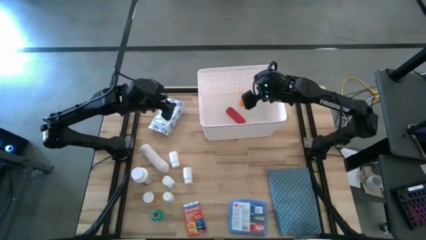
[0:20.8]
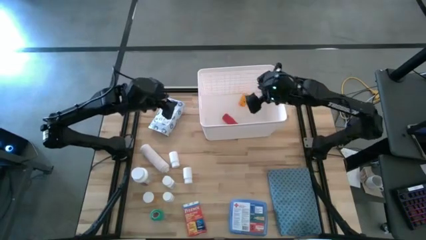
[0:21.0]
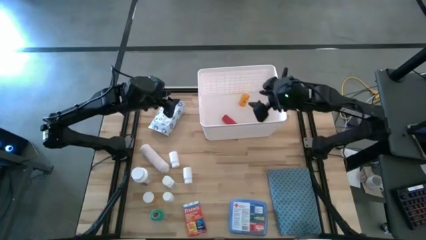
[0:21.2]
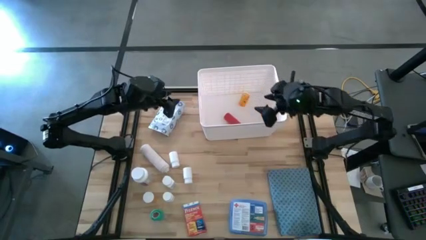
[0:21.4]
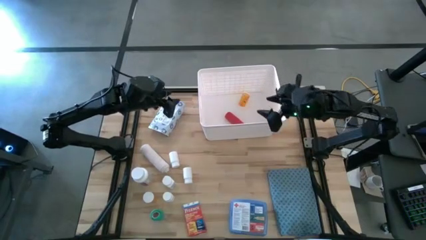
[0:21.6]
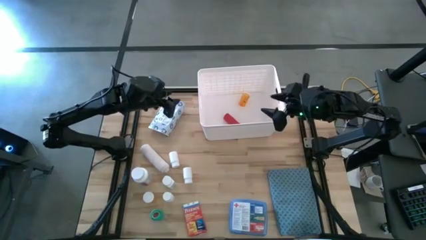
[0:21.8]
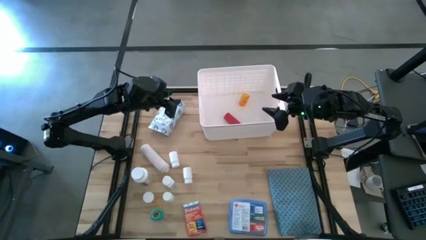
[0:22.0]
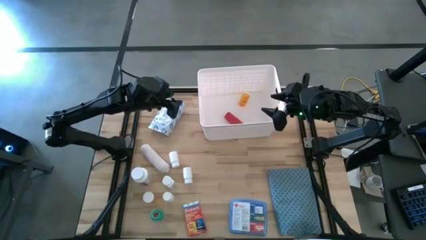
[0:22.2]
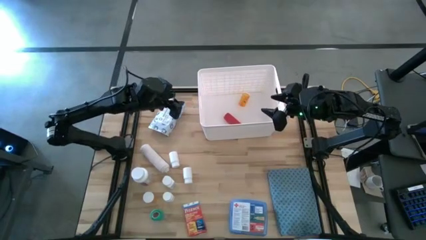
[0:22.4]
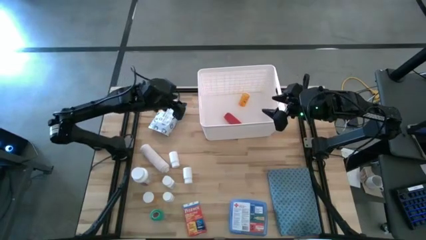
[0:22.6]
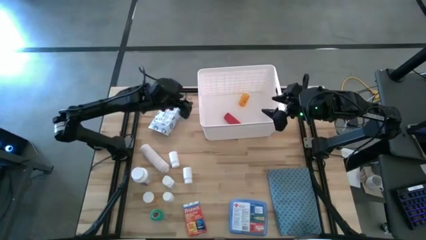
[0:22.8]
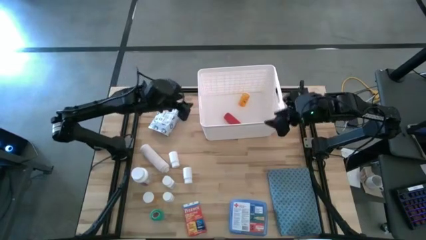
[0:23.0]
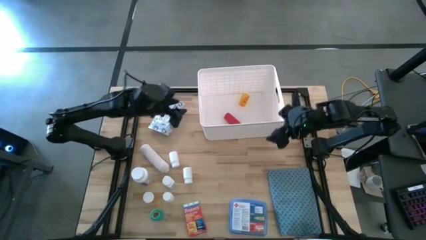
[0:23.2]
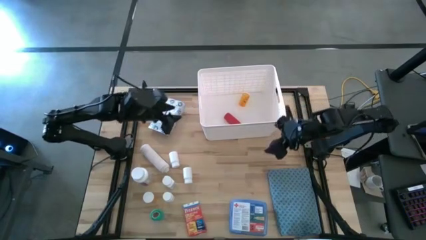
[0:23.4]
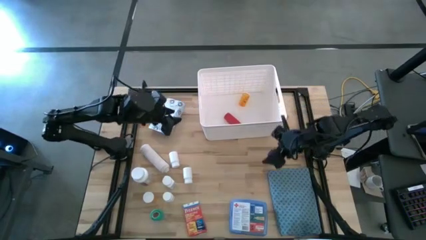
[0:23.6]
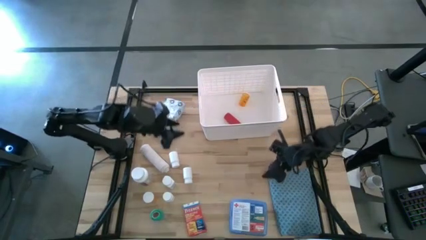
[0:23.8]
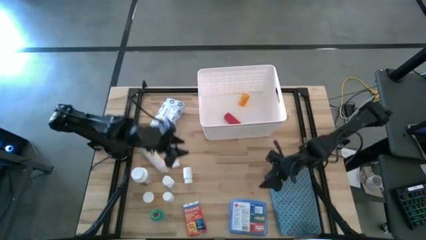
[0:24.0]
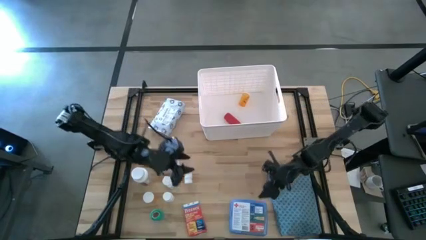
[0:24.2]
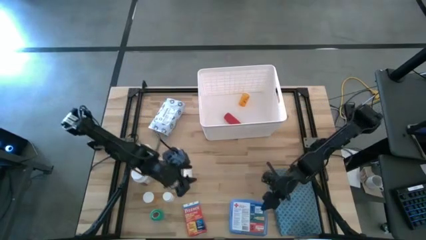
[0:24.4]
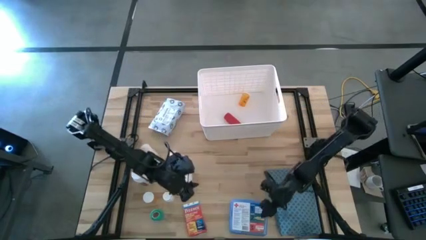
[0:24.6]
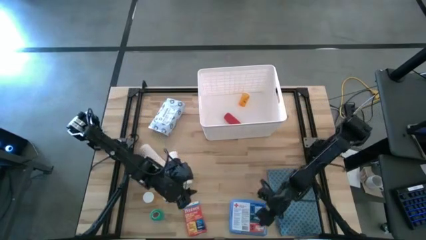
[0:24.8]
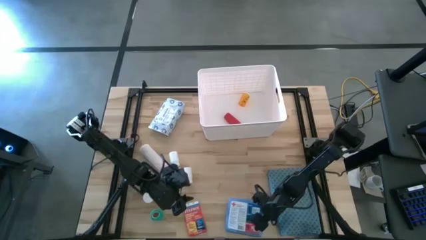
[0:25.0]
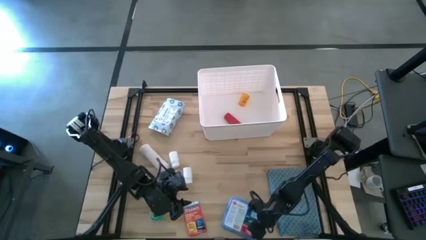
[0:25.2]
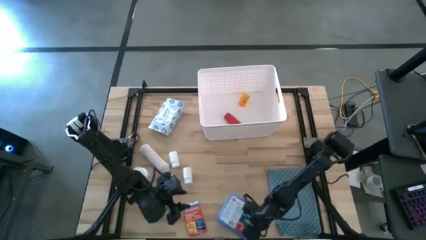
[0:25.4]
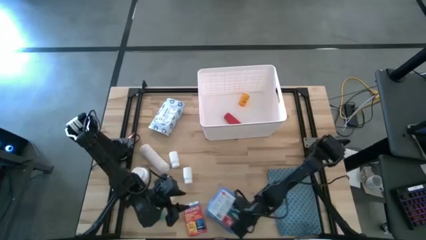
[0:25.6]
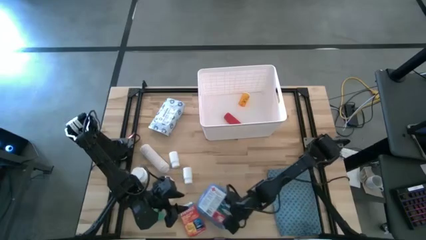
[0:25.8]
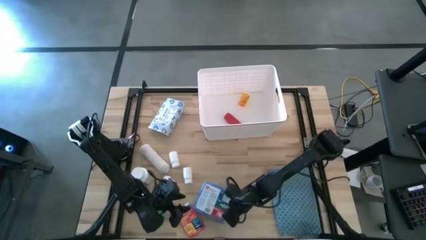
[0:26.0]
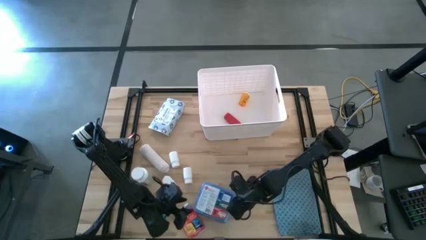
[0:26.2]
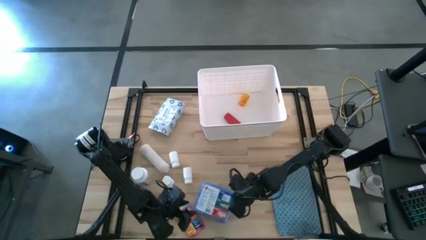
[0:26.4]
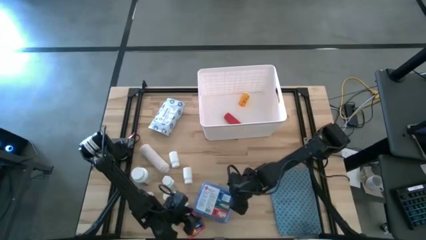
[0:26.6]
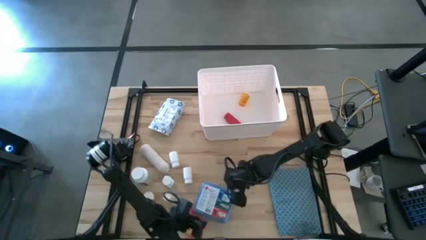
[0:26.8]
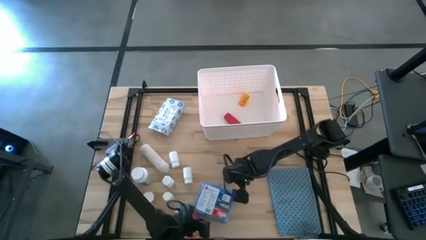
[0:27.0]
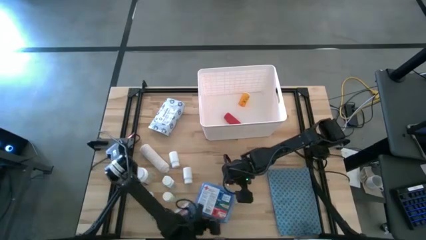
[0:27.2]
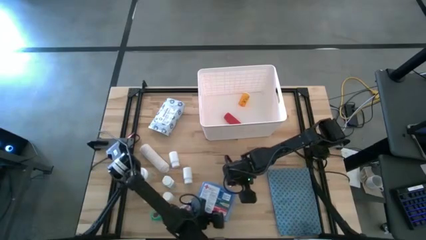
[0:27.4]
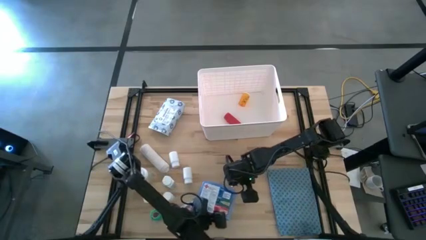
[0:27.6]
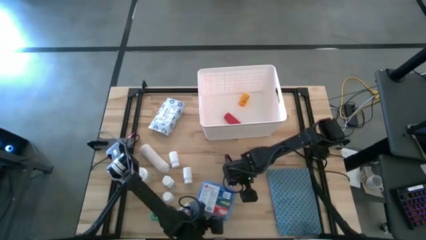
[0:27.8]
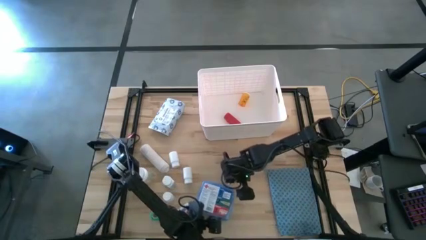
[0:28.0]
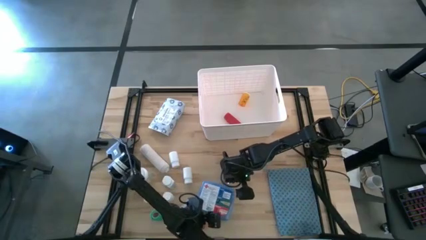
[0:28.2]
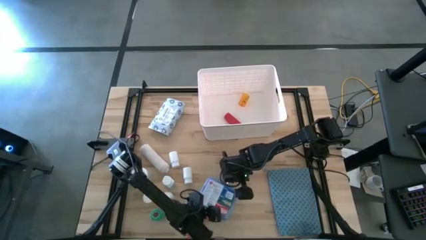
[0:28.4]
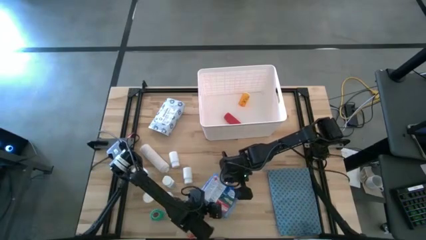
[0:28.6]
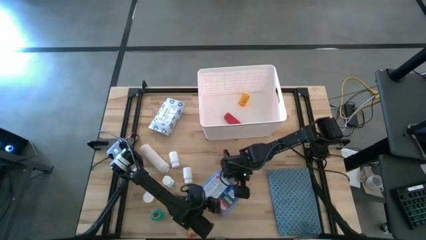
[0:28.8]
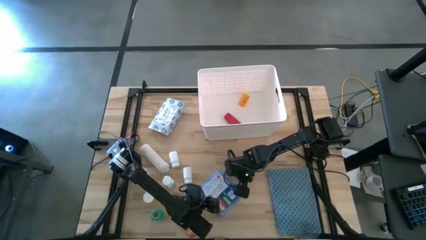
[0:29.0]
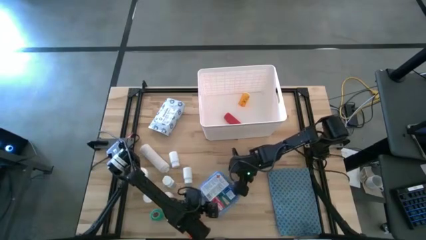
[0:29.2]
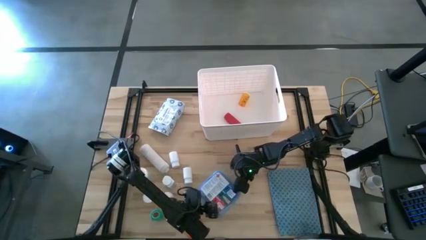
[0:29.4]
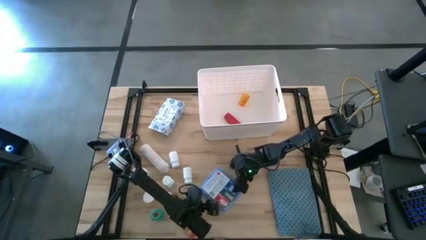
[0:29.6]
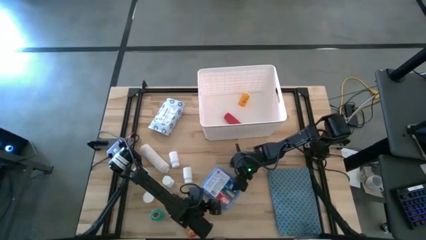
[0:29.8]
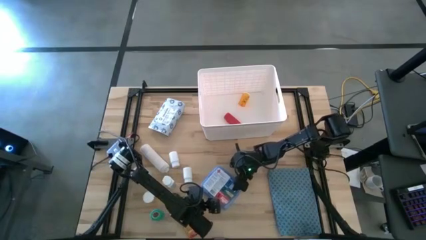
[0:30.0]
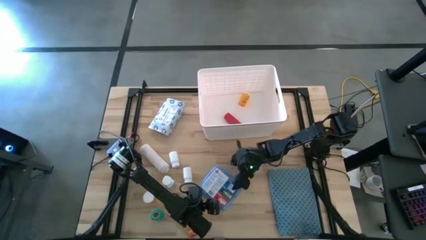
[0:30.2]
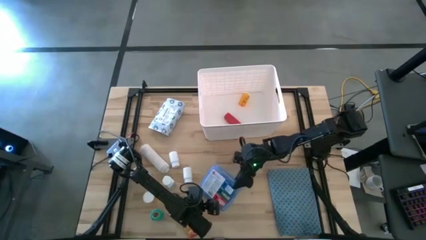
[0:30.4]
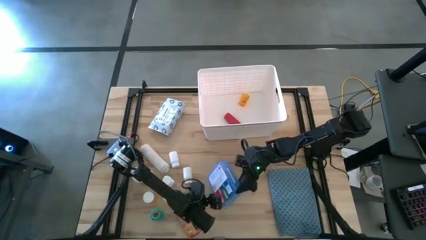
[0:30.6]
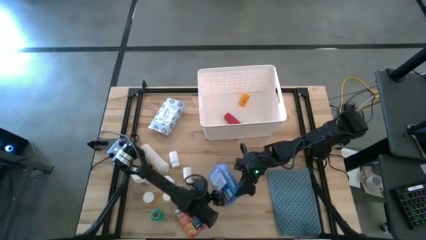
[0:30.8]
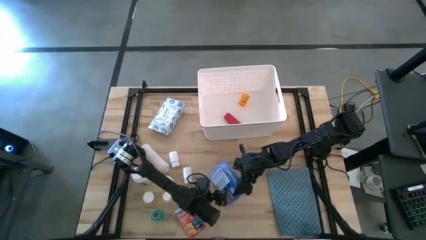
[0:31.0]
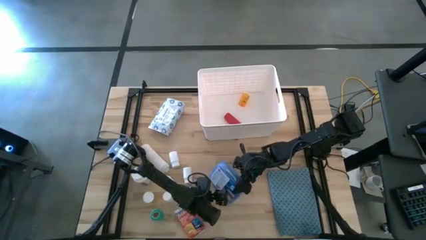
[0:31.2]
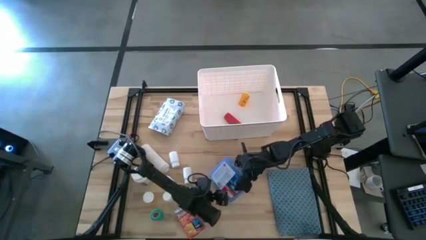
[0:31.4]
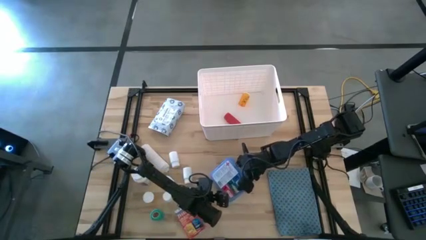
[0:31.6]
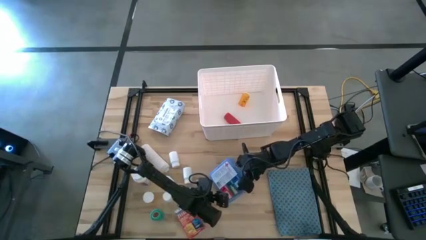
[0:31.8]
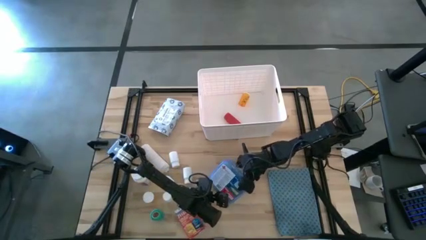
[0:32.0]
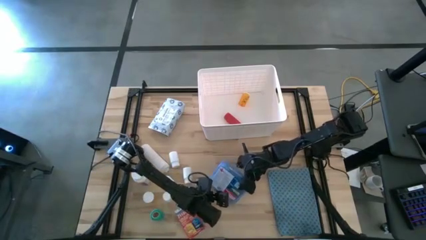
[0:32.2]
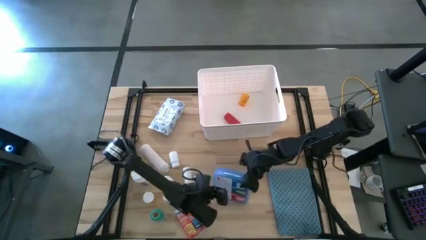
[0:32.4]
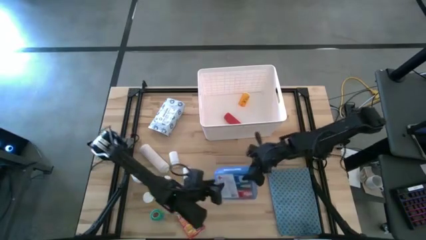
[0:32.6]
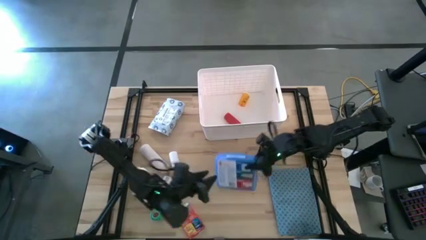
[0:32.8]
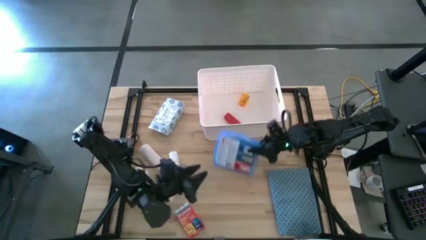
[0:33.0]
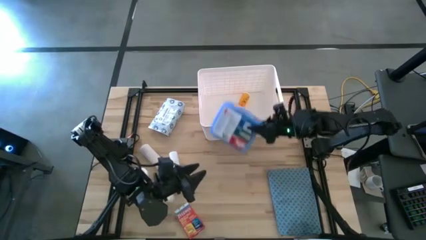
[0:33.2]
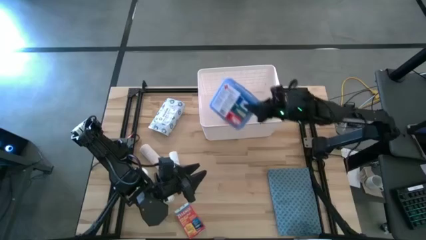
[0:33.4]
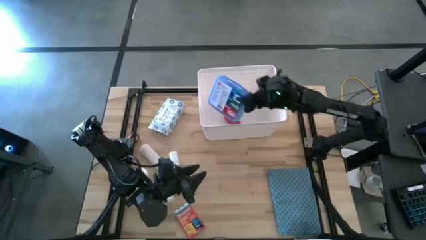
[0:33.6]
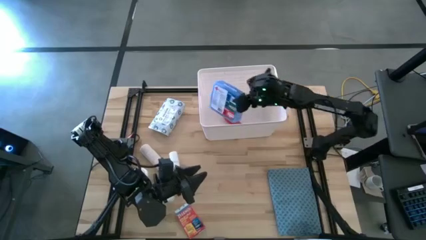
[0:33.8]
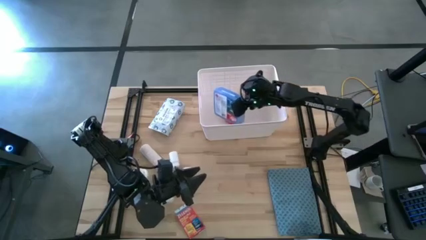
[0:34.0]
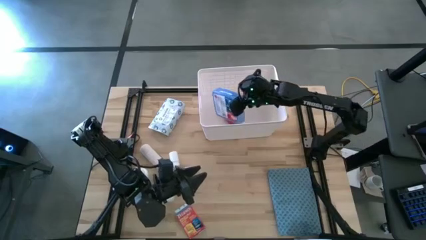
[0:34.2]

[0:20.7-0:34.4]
Task: Pick & place medical supplies in basket/bin
Put the blue medicine kit into the white bin

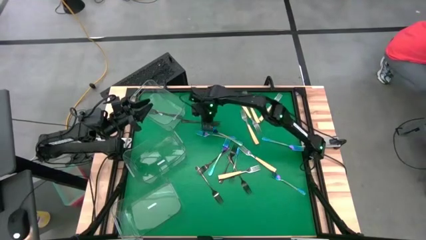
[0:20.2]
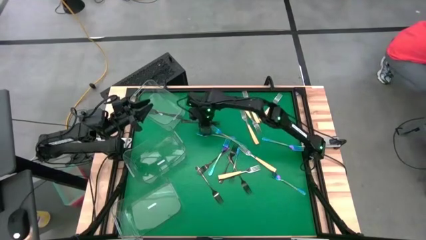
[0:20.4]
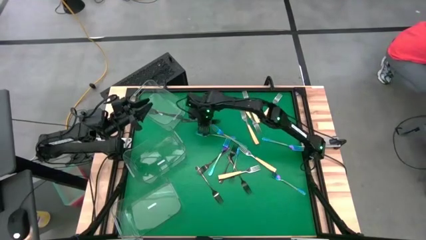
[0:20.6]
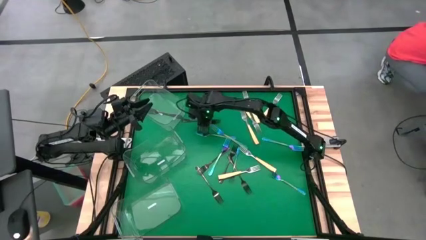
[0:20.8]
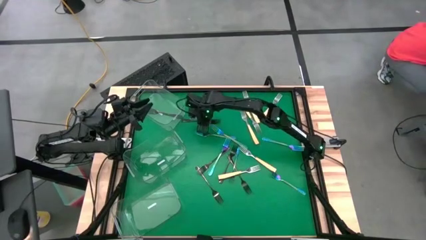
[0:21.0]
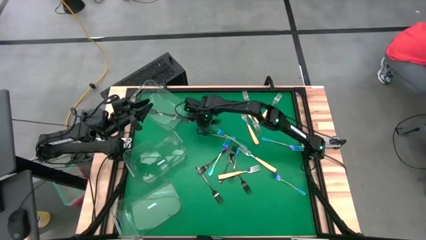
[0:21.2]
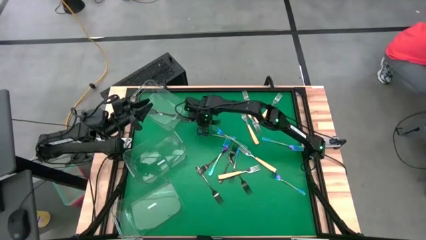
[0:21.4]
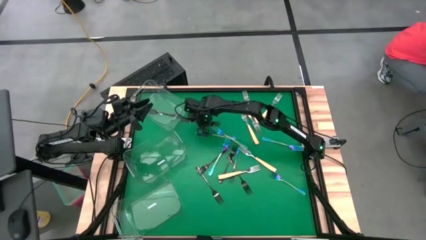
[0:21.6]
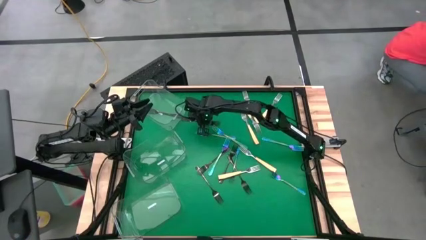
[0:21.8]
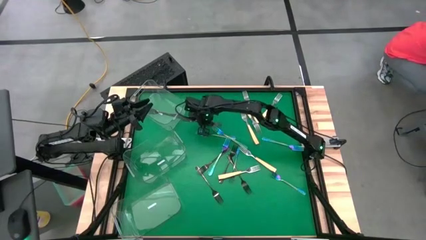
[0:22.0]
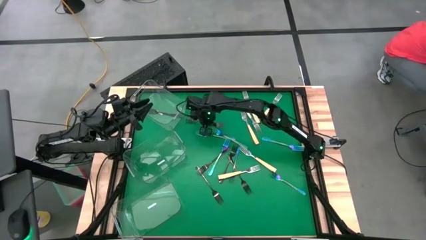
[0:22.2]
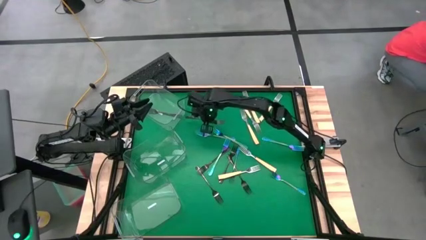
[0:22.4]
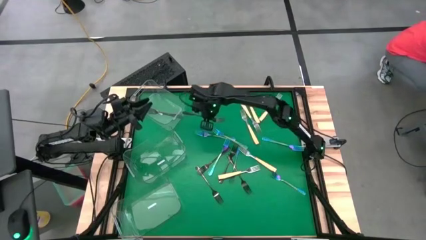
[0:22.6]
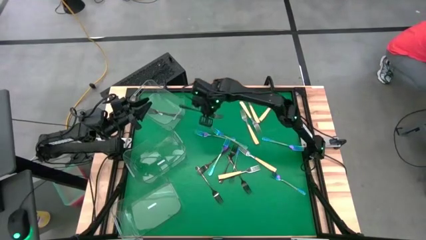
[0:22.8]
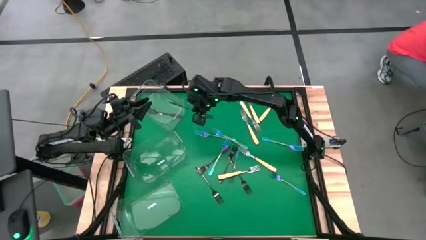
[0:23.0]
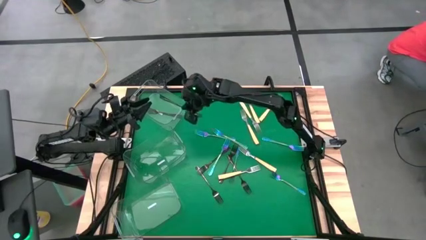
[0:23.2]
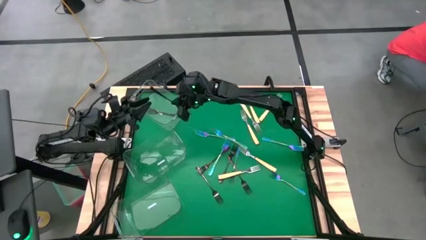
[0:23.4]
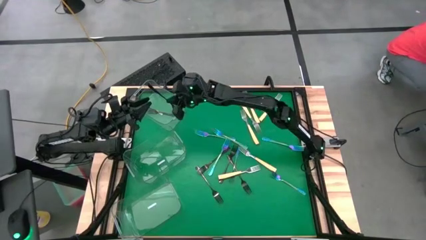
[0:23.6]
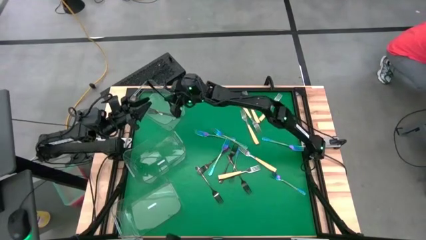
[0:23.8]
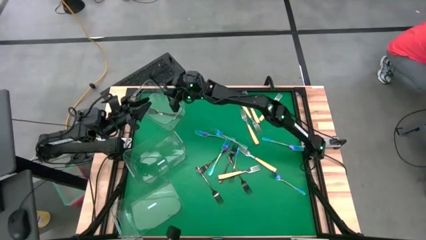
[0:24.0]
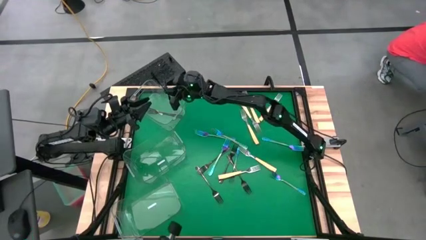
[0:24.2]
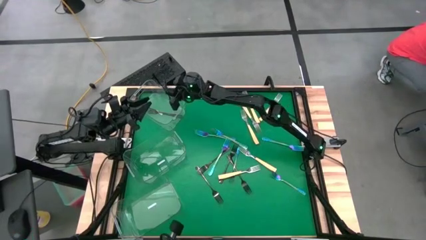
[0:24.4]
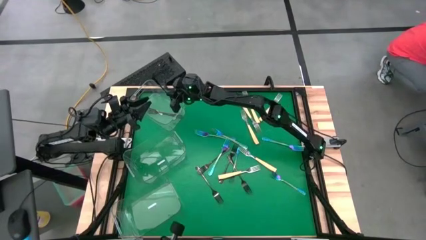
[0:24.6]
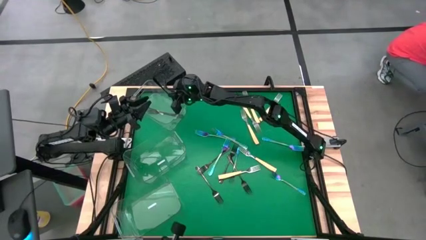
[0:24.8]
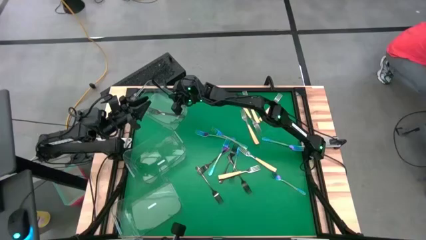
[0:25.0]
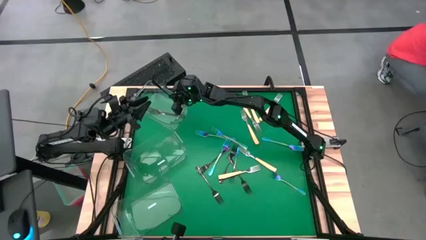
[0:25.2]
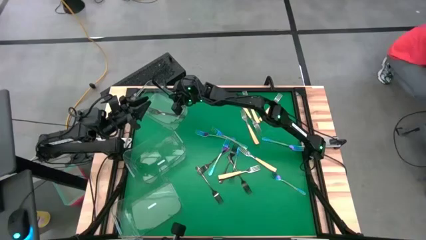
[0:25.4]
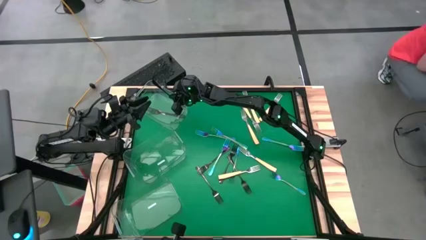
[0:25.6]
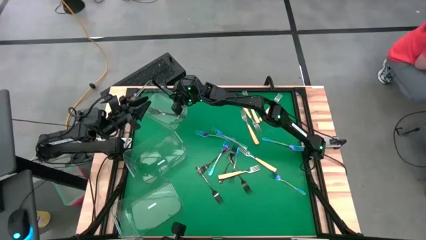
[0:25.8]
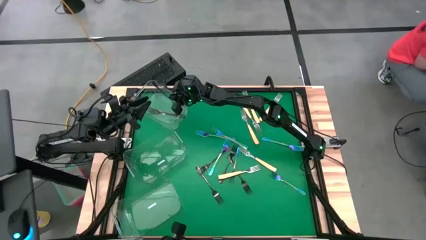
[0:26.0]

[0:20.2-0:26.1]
Task: Sort silverware by color (type)
Put the black fork into the top transparent bin
